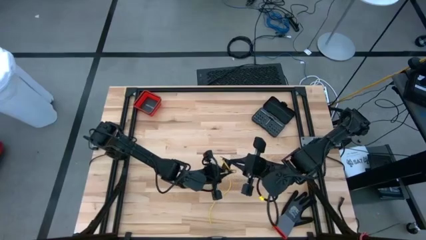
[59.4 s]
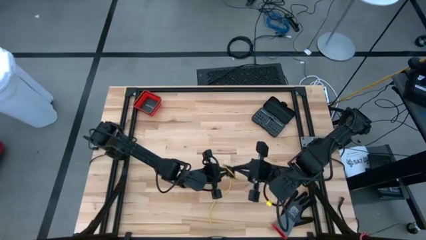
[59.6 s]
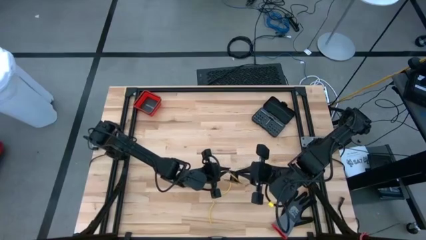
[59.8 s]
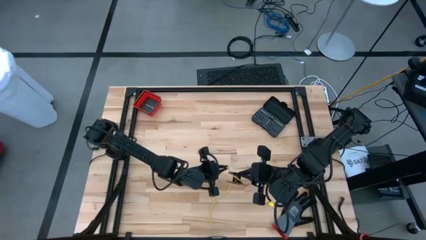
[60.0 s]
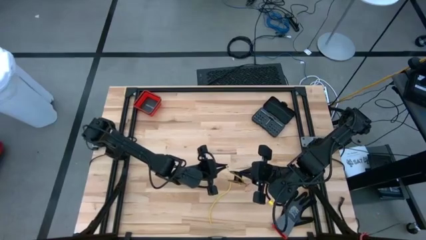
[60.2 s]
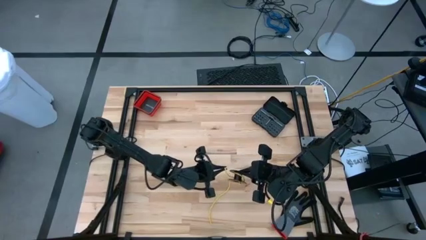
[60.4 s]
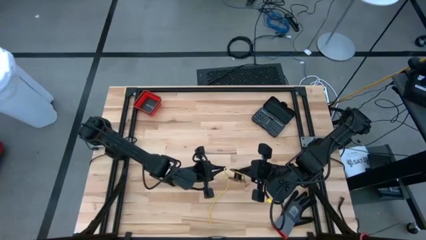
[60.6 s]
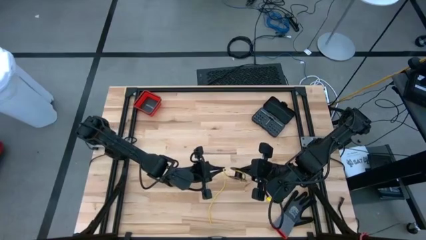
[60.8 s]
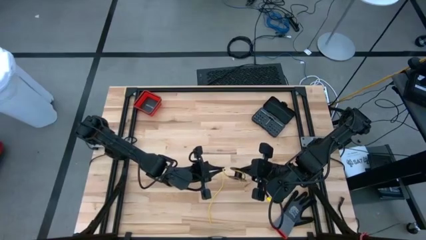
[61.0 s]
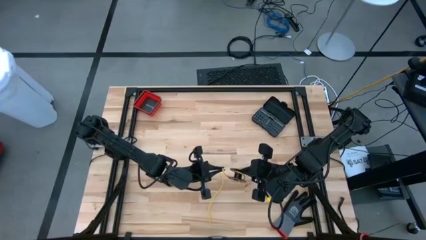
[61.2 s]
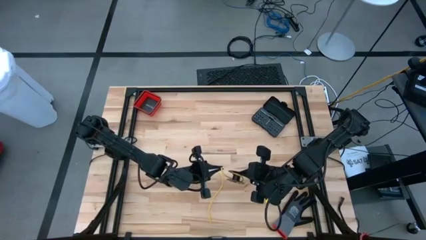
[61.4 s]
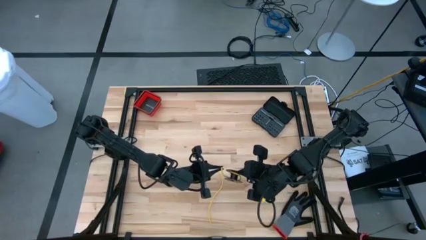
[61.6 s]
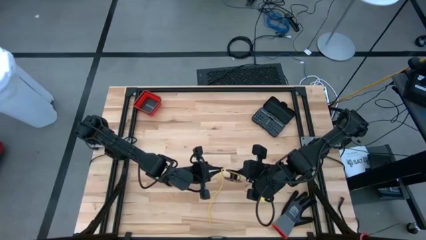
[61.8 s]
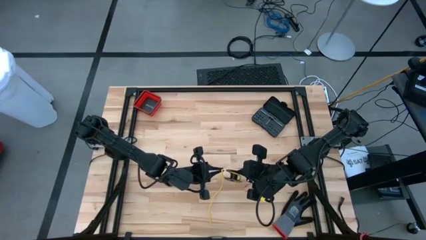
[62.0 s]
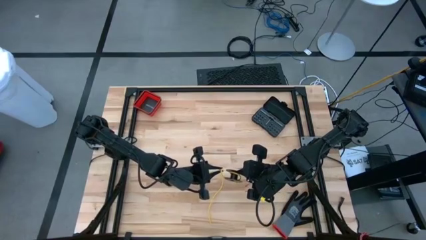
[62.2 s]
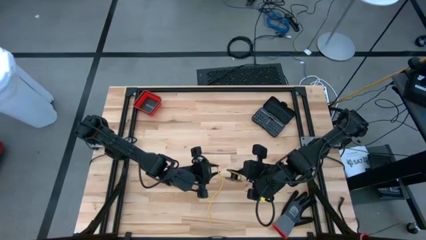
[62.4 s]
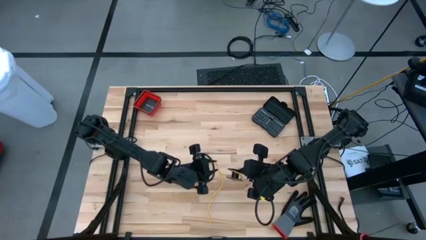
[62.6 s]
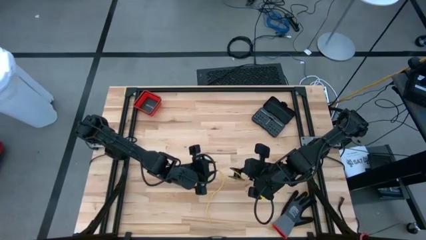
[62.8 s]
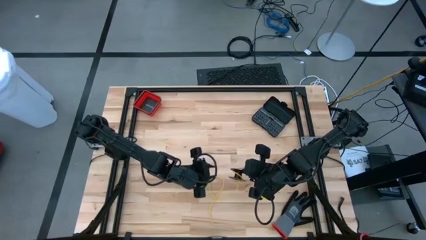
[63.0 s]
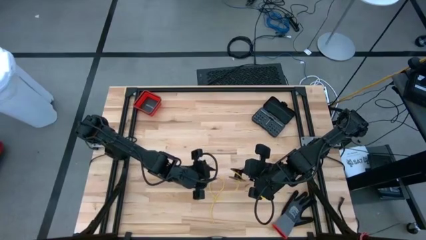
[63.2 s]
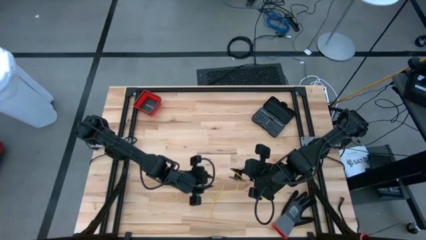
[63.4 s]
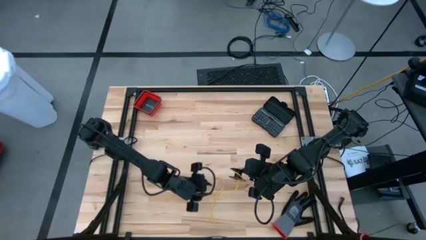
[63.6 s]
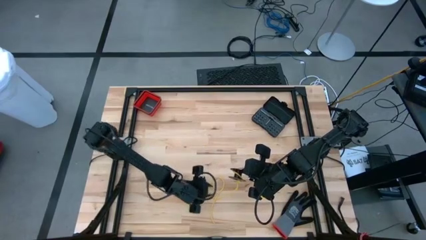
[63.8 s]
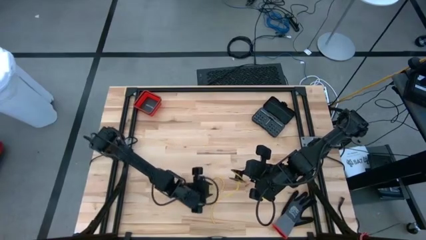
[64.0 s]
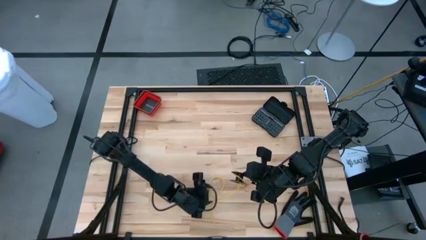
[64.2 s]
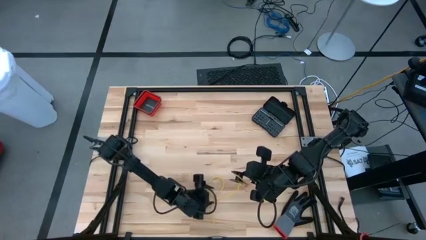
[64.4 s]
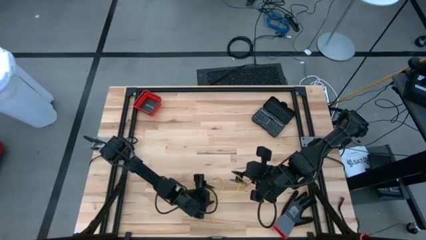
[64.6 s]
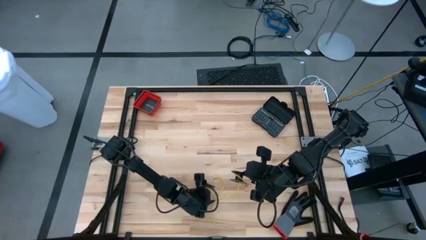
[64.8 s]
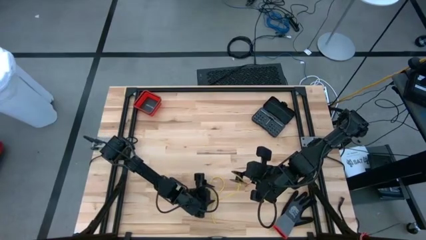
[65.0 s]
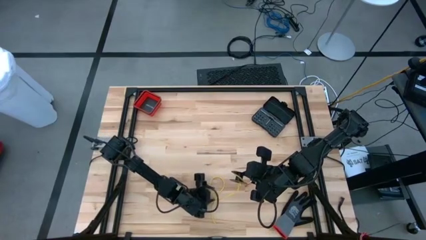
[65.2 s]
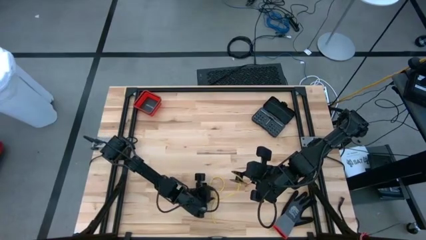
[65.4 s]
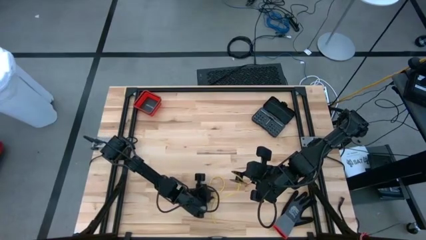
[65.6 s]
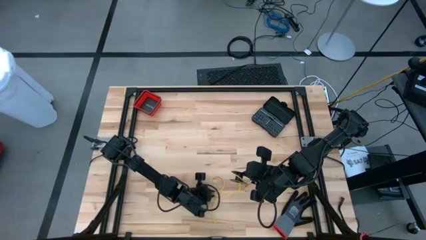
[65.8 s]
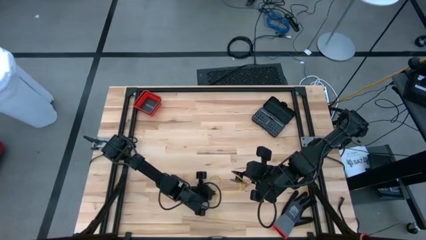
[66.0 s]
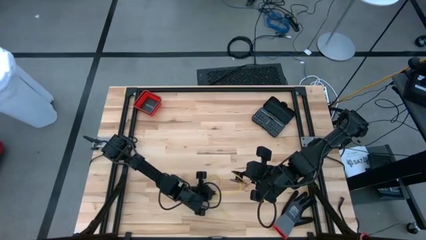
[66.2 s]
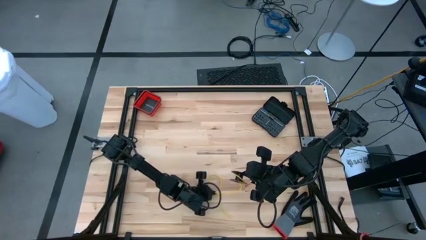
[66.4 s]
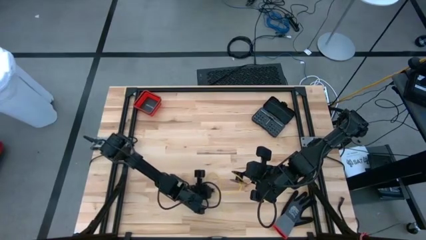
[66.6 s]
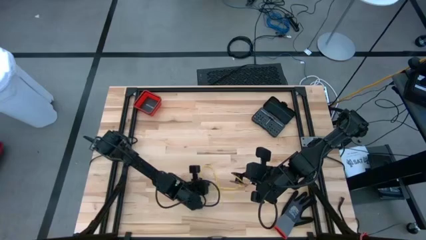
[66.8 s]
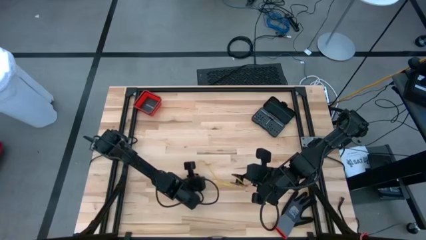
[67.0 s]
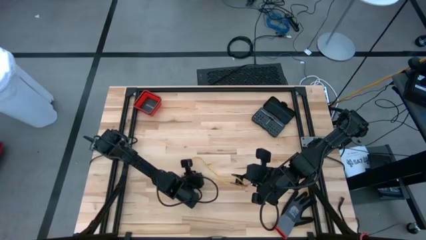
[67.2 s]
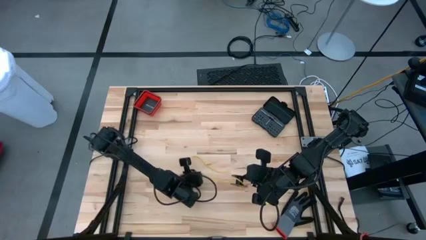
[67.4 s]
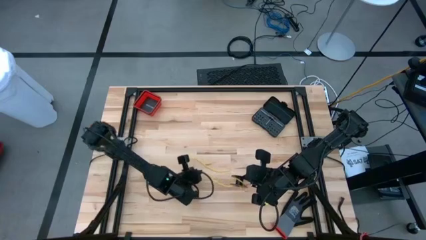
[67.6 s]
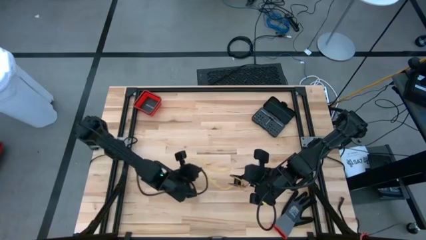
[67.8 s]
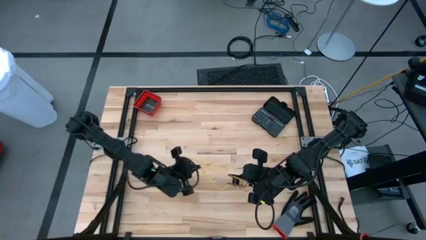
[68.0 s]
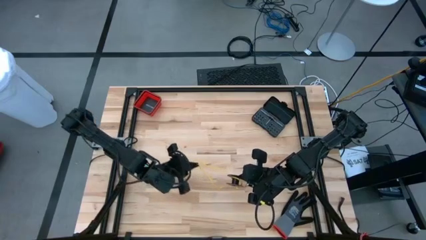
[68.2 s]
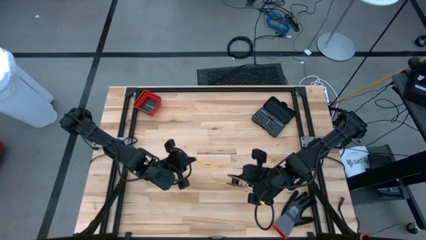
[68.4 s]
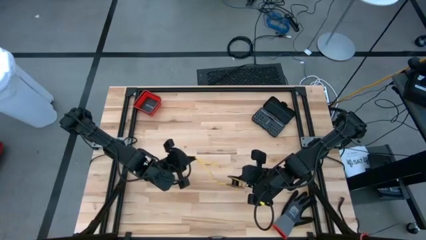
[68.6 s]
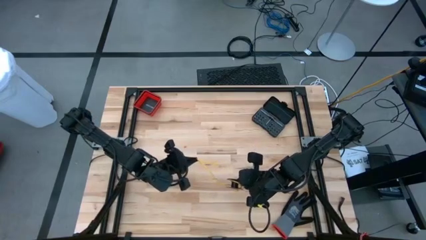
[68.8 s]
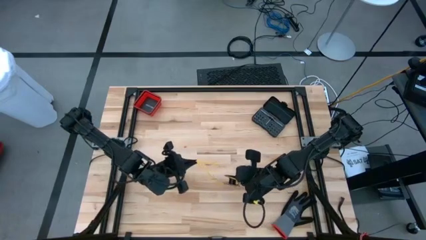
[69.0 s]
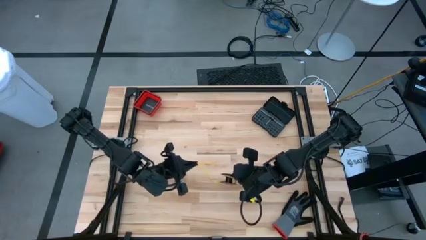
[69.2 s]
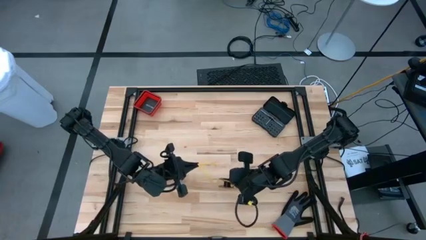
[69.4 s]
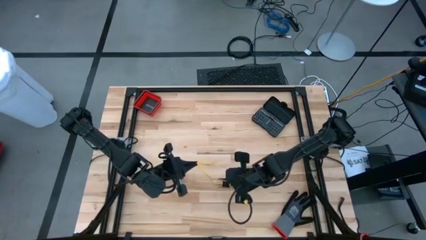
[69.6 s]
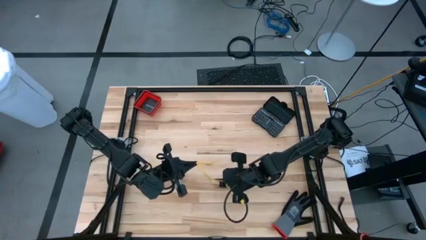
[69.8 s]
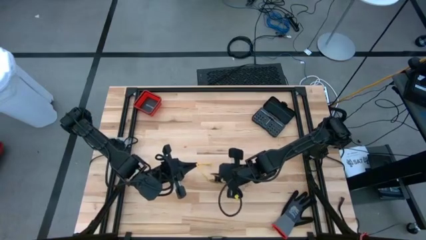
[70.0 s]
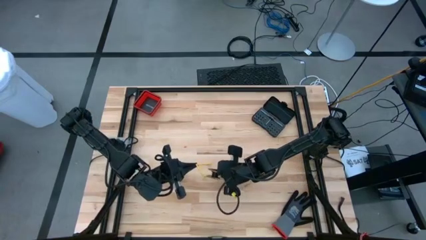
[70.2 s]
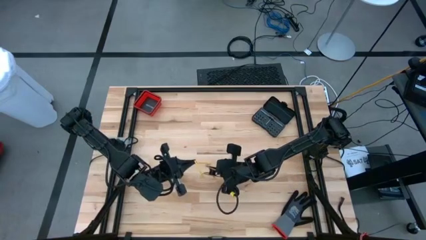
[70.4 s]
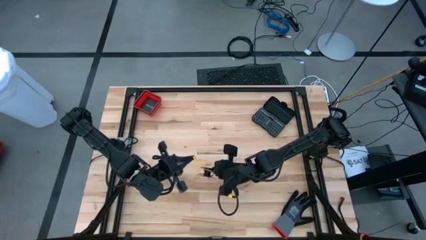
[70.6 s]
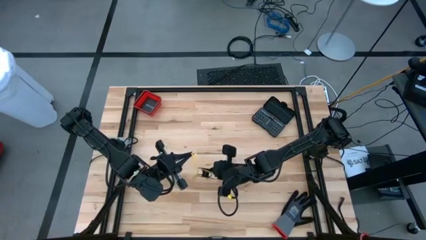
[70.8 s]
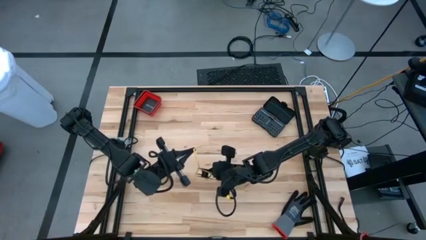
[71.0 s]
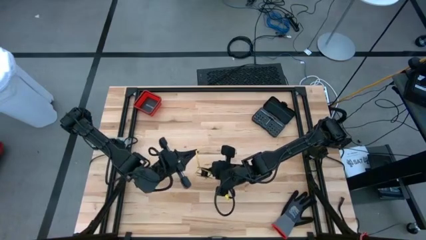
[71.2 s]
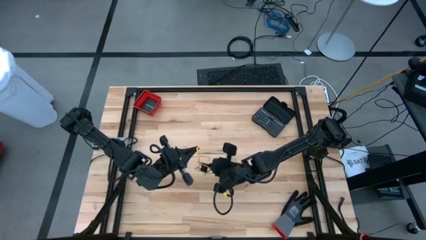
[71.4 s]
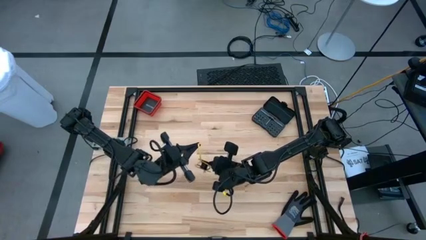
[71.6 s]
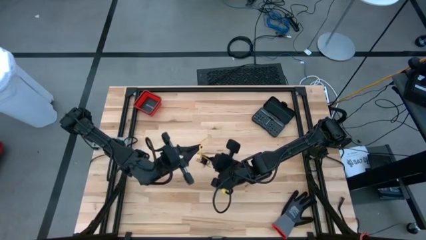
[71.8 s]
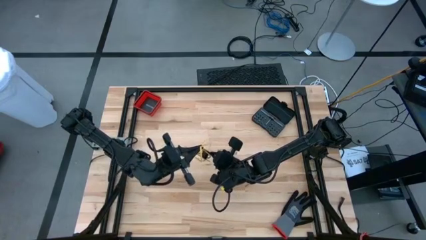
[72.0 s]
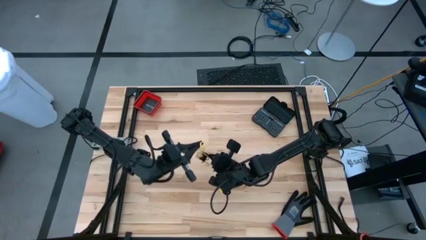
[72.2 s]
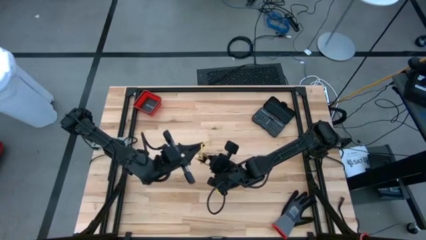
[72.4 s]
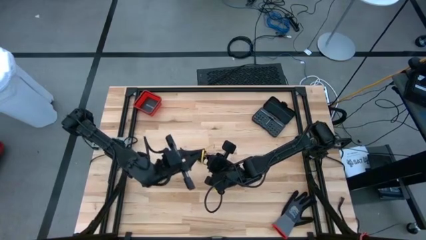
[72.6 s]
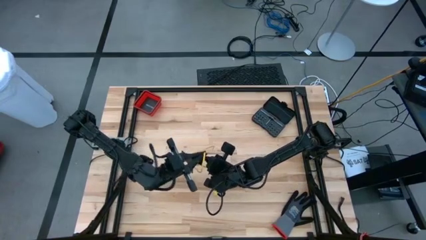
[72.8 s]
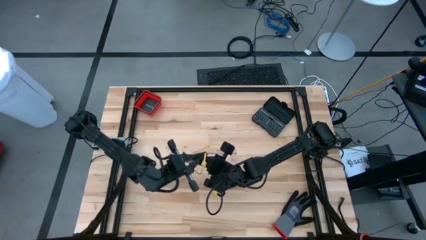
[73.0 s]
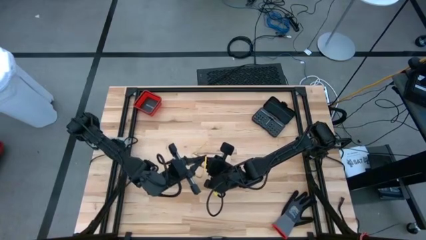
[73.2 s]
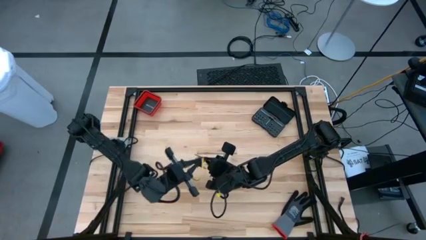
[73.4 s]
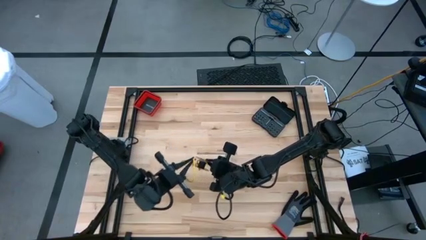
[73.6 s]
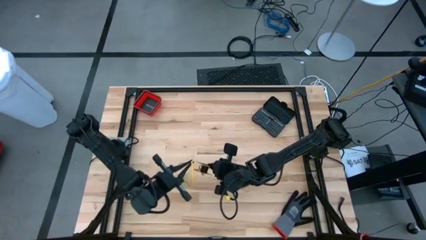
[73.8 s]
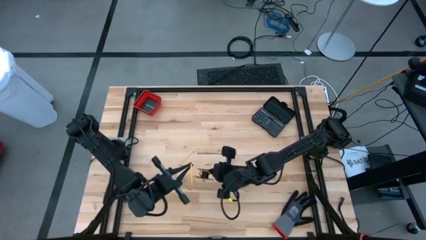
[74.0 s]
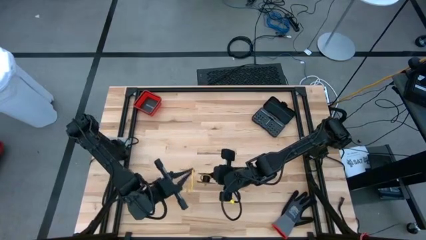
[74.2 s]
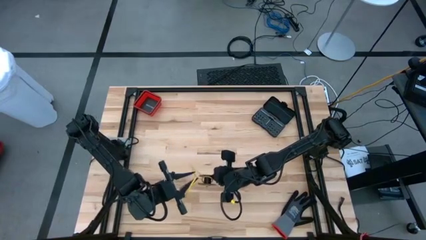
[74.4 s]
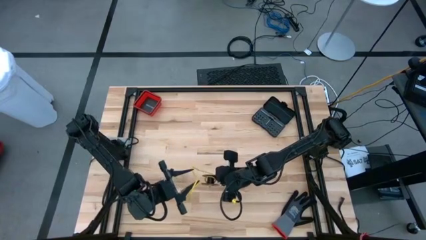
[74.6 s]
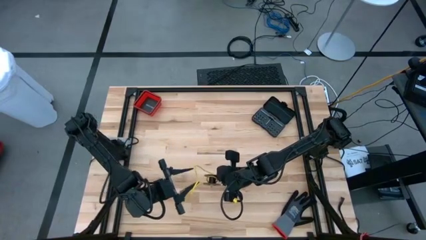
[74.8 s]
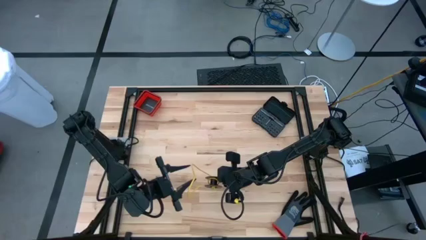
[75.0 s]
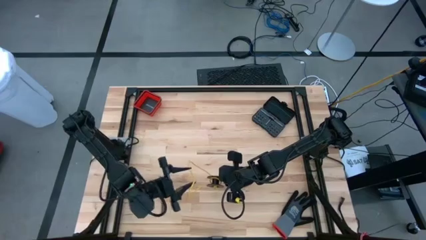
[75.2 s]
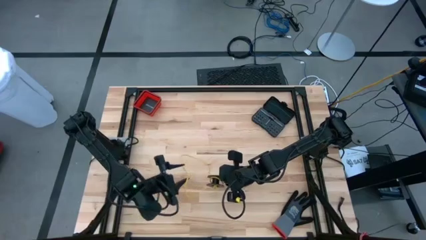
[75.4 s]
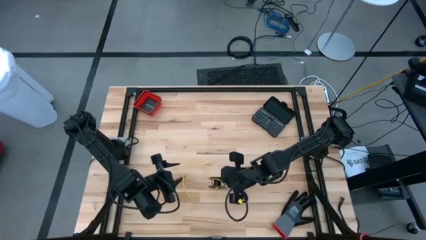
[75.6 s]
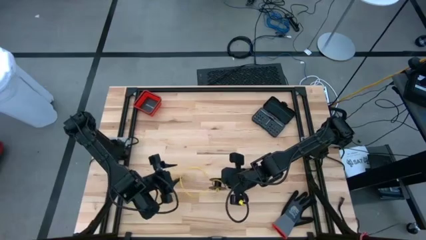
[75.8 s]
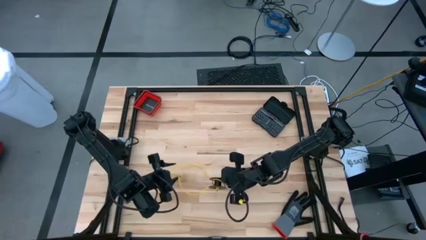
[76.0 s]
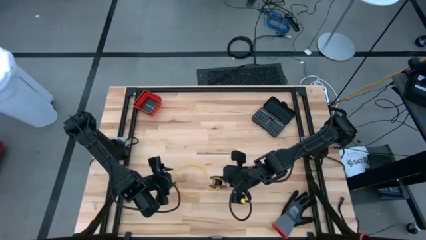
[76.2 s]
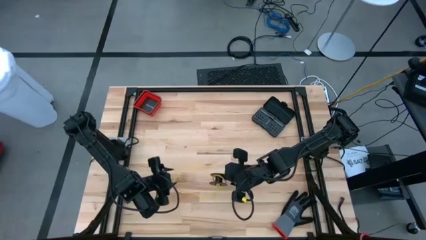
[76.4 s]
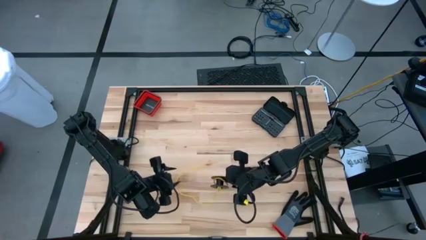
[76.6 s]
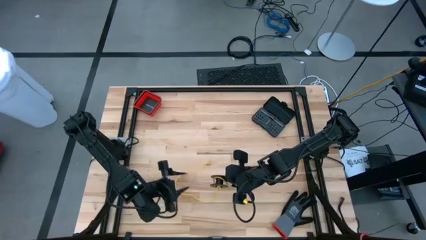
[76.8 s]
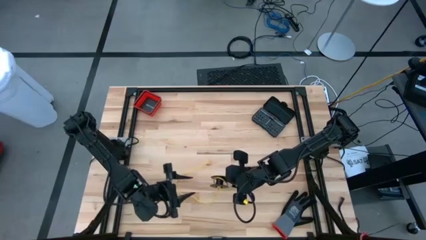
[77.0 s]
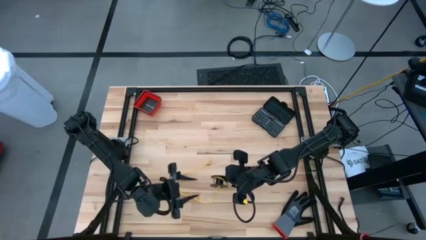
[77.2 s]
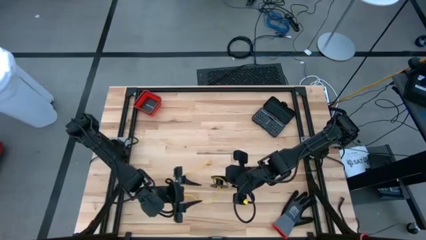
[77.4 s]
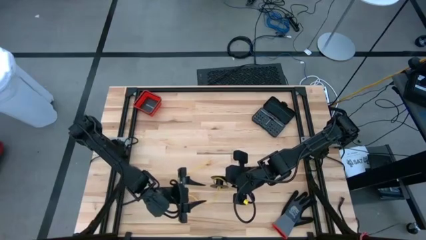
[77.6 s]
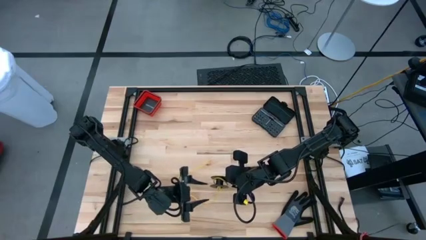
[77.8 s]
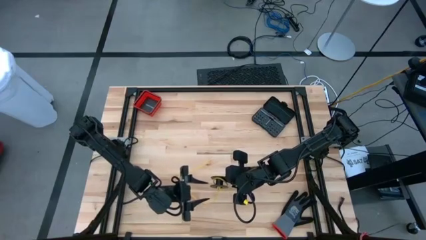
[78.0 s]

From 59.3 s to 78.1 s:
Task: Coil cords
Coil the yellow cable wire onto the spool
